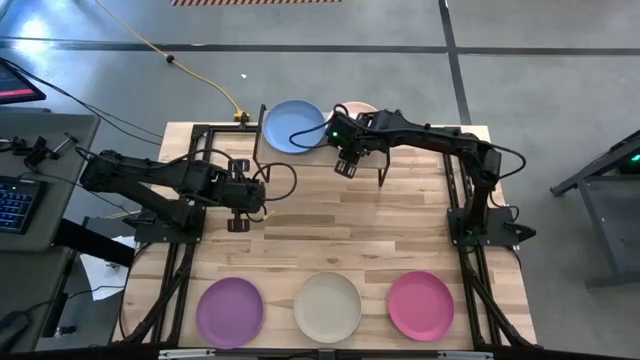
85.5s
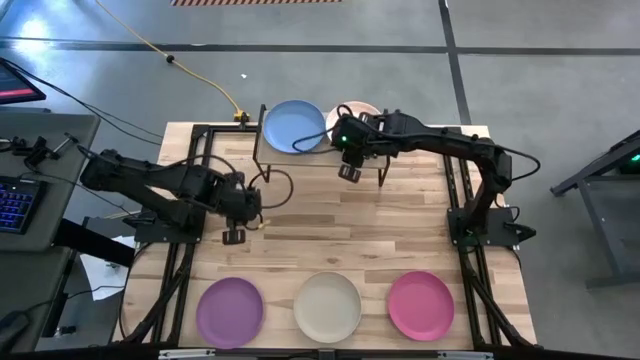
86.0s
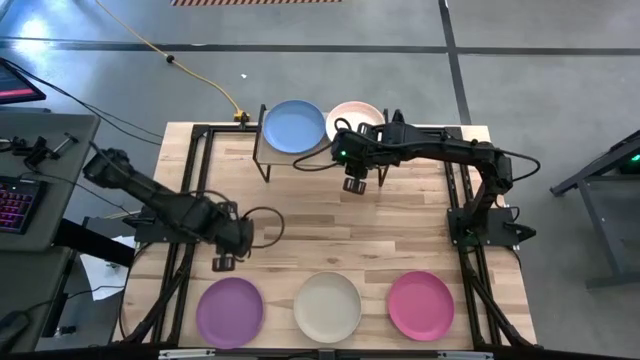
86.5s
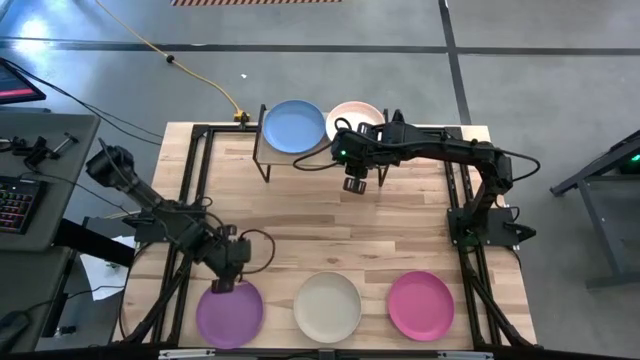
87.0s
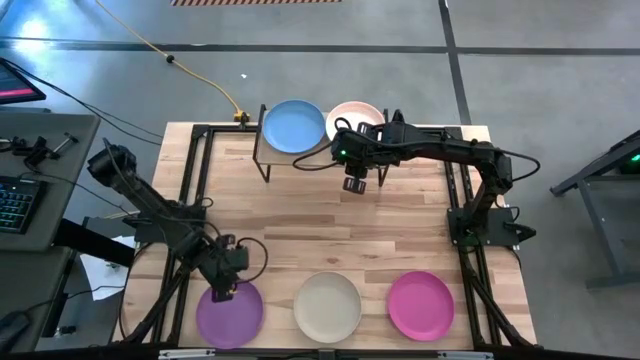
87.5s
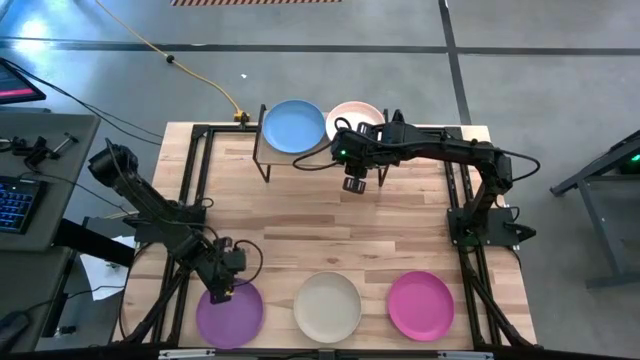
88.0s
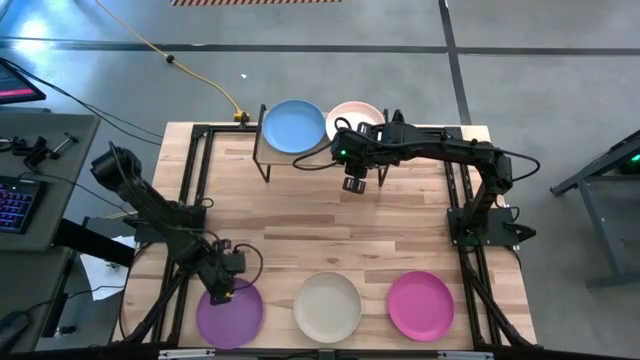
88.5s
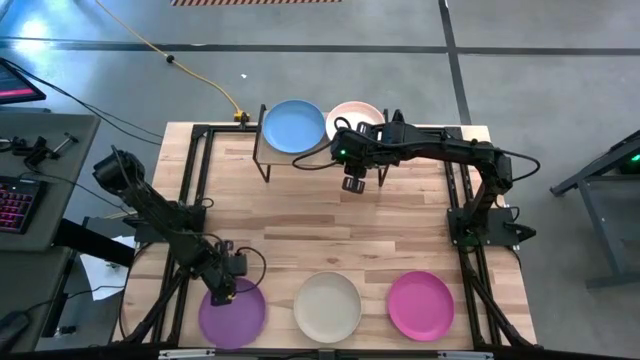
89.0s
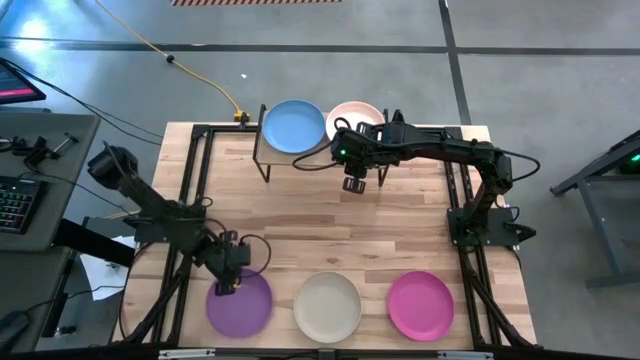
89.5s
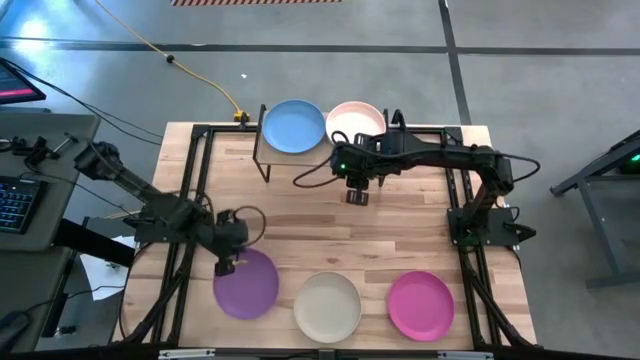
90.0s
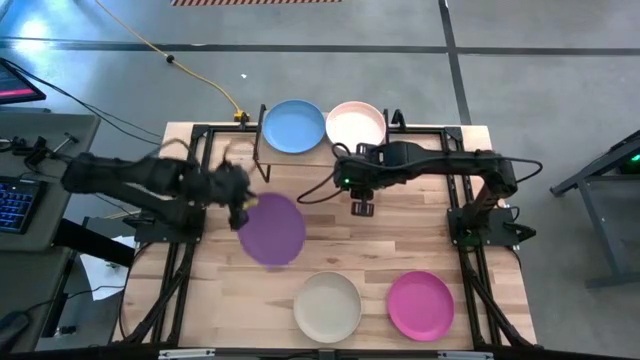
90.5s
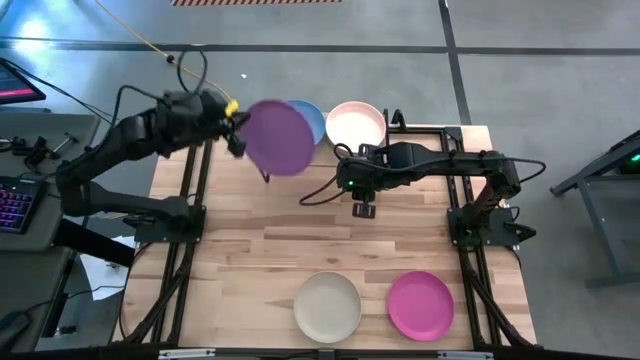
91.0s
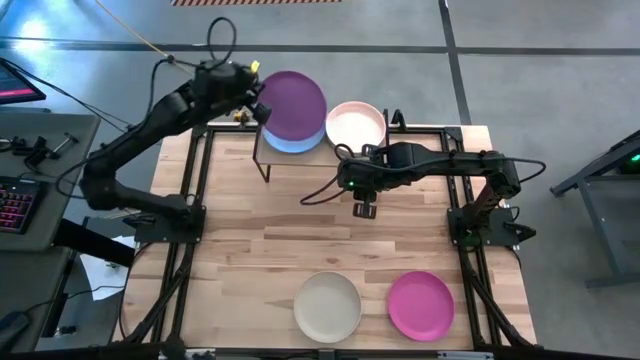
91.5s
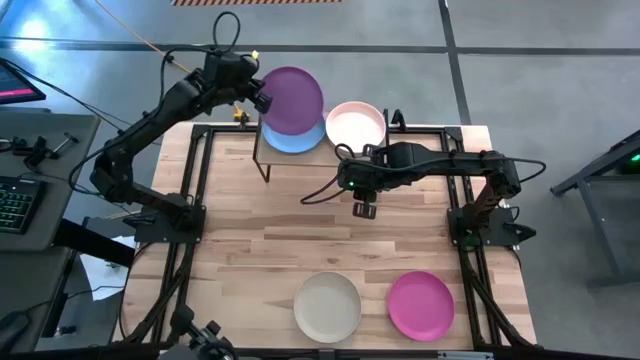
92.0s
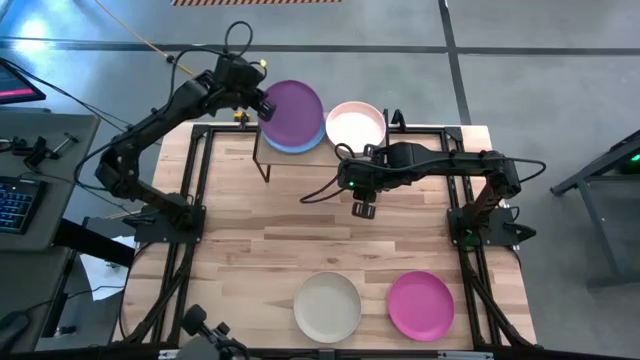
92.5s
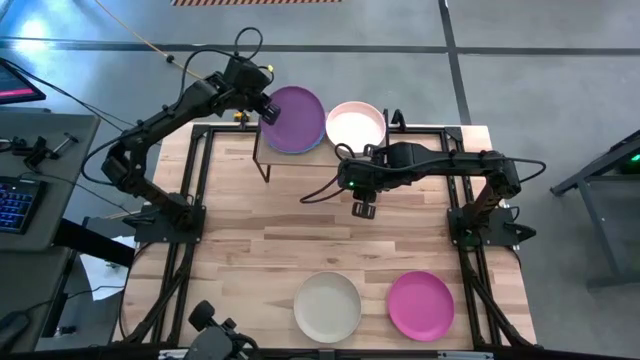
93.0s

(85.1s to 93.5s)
Task: Place and stack plates onto a shelf
Stack the purple plate into the blue plate on the shelf

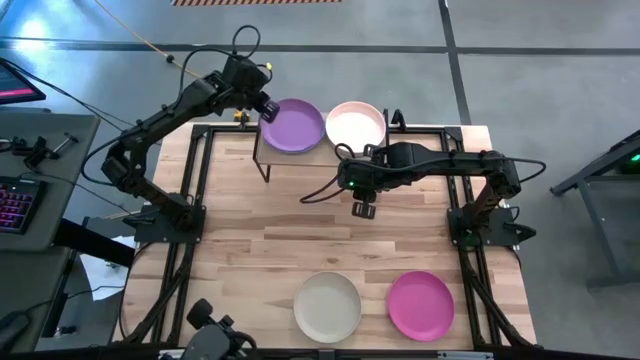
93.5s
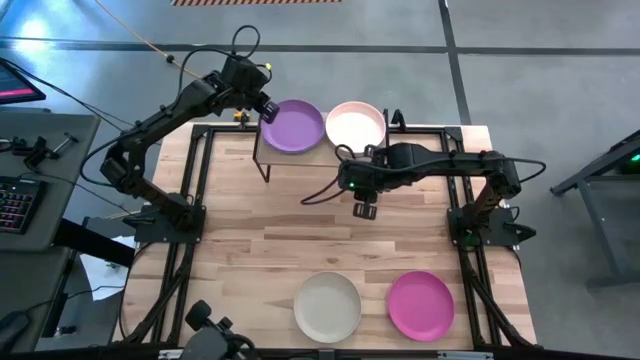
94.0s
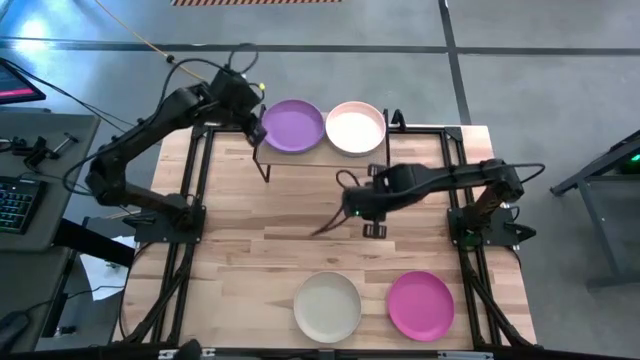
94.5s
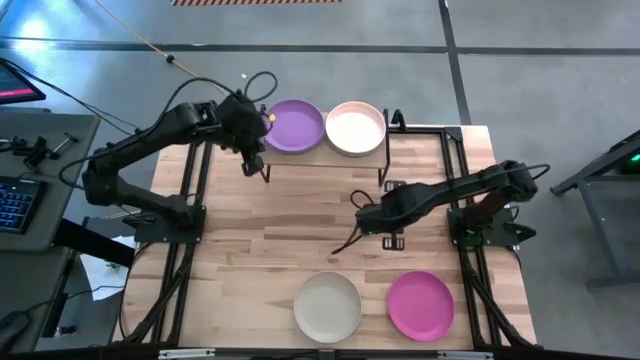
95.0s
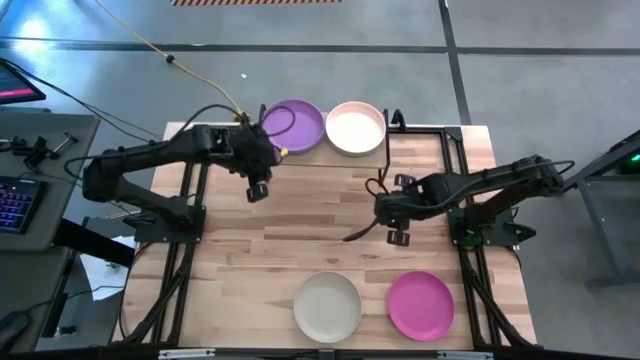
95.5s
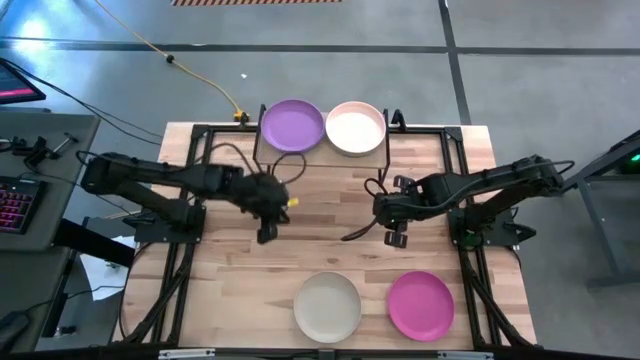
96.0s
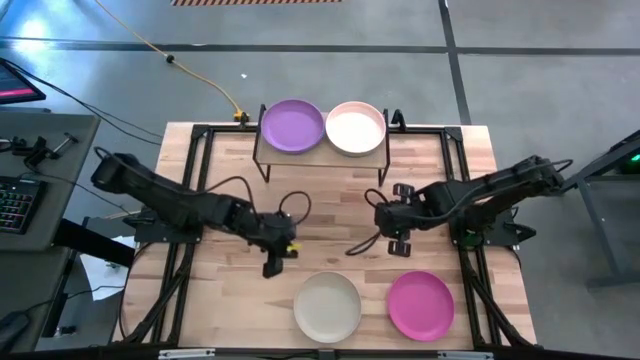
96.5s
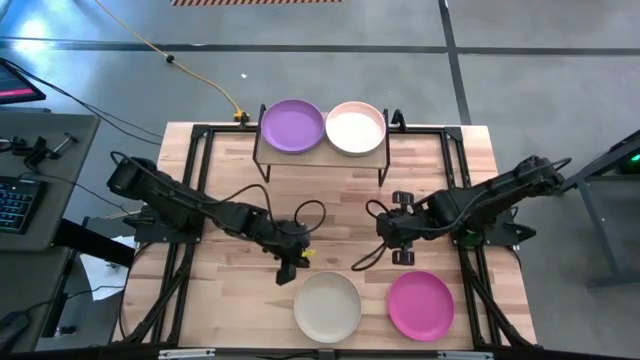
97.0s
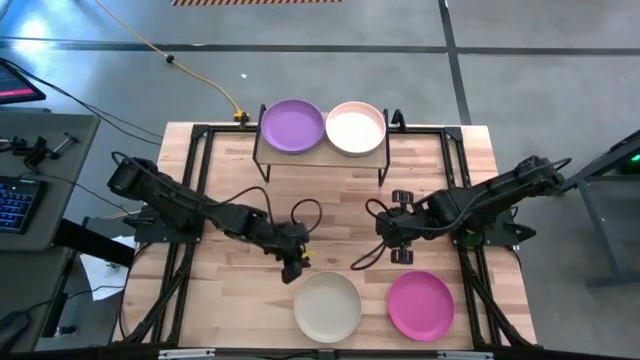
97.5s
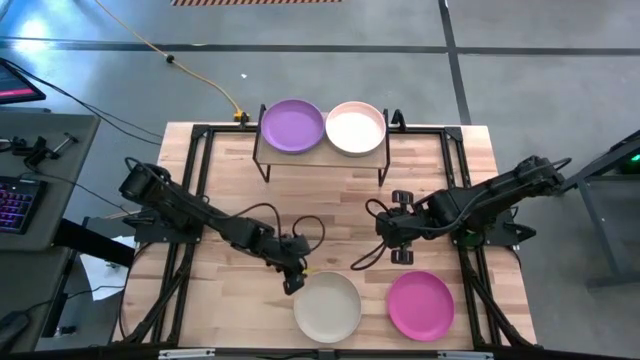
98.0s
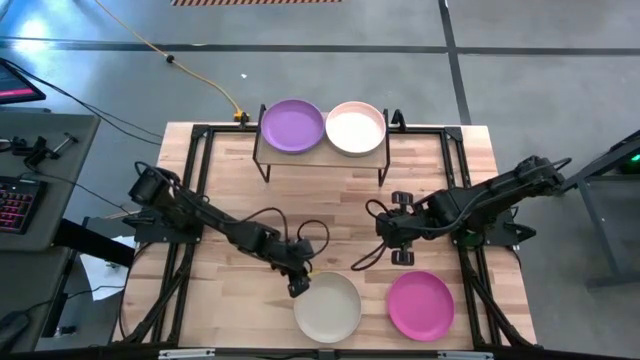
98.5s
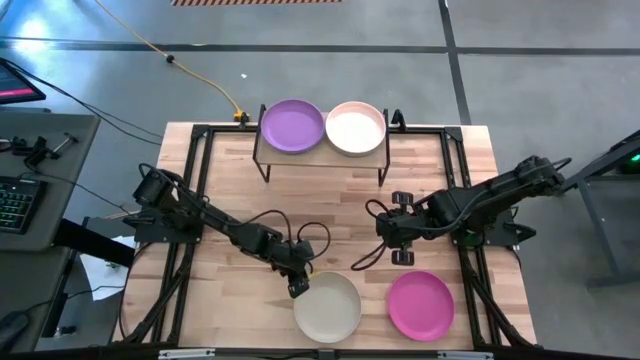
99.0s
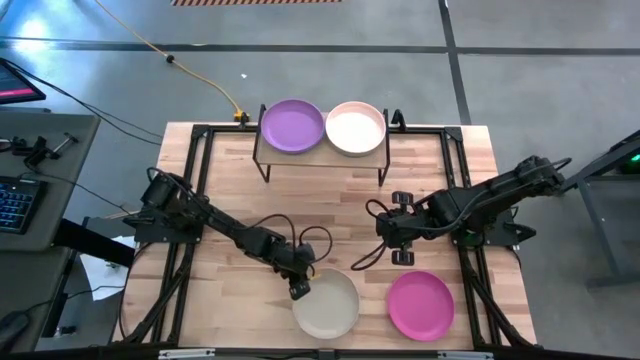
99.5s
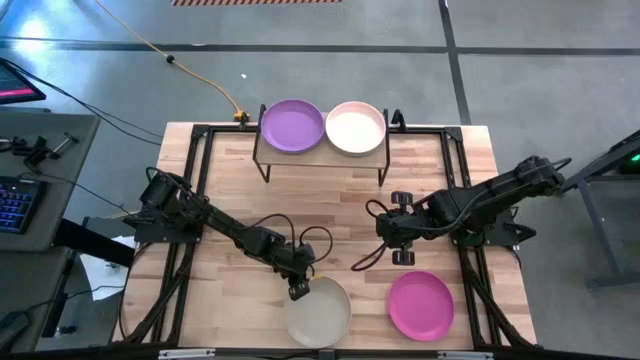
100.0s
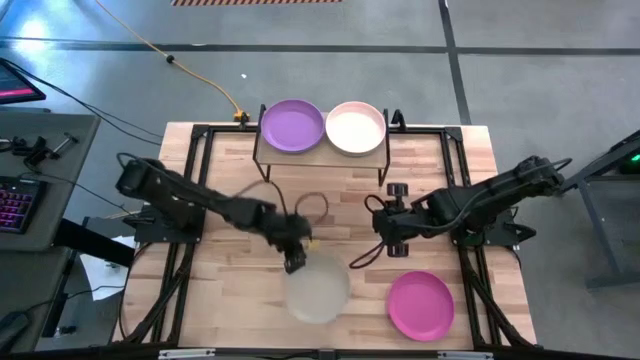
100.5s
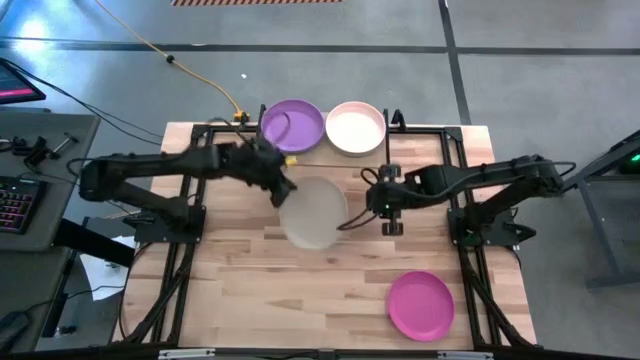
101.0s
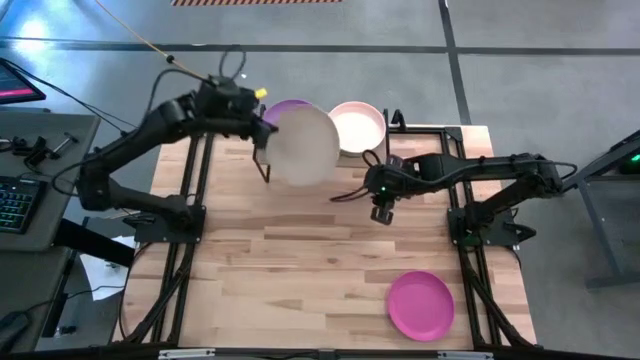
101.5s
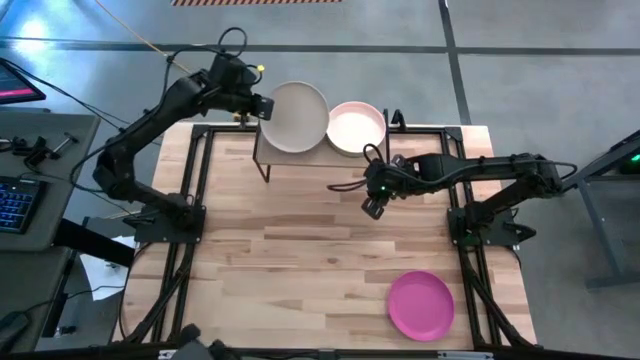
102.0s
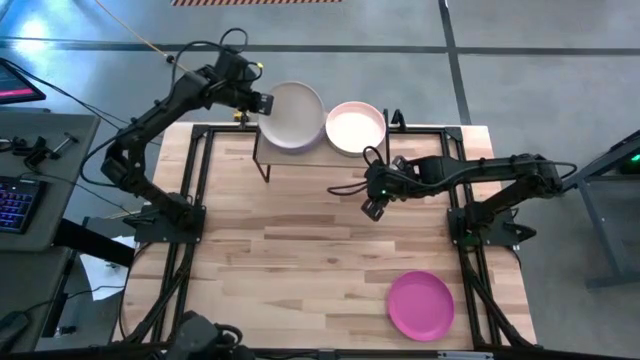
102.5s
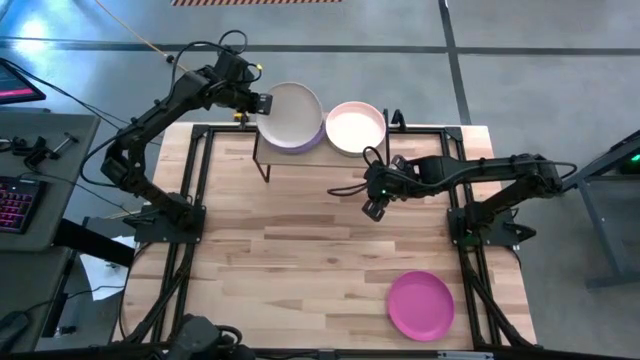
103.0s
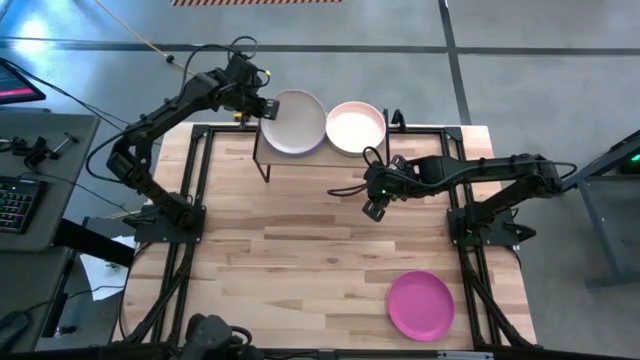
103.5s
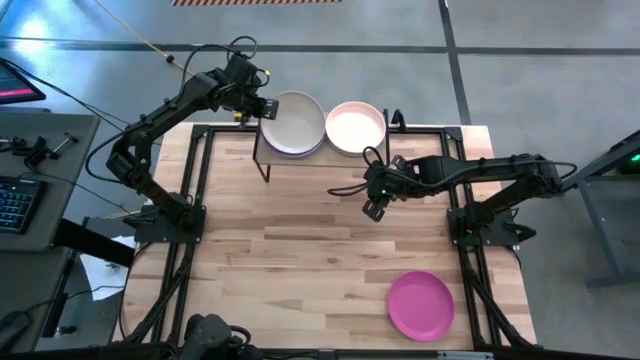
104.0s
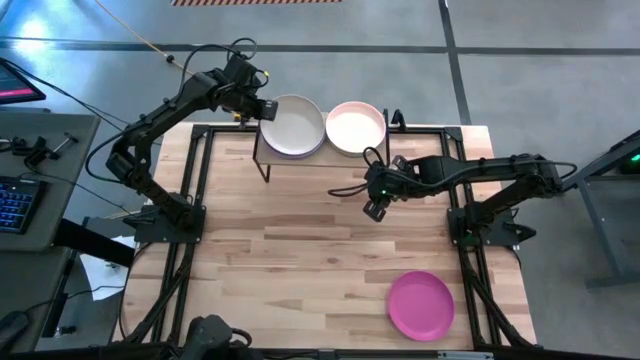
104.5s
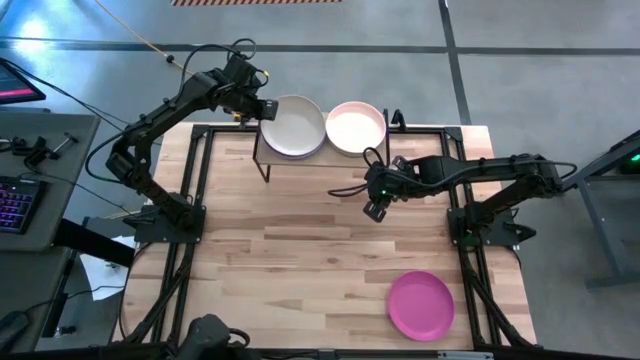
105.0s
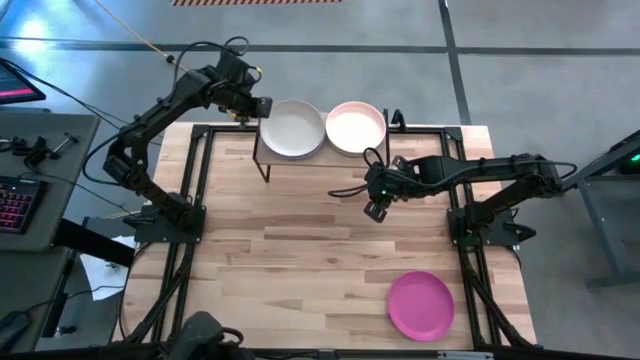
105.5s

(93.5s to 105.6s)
Stack the light gray plate into the purple plate on the shelf

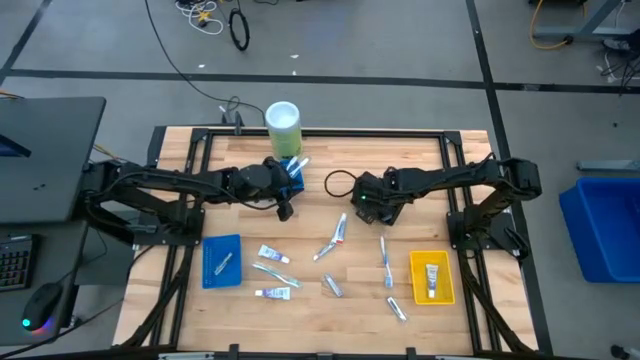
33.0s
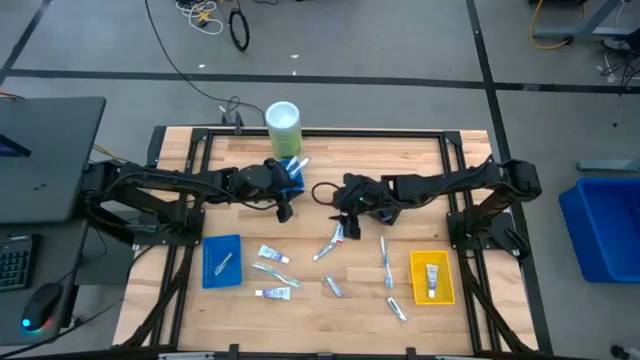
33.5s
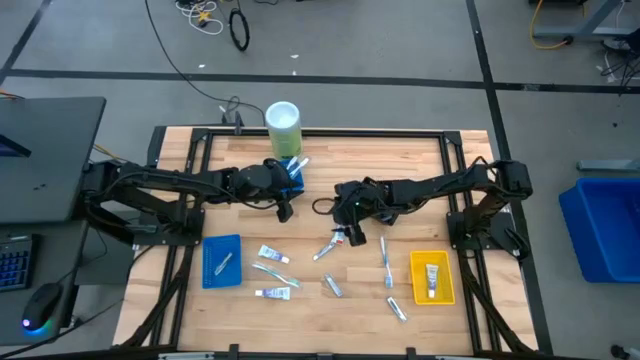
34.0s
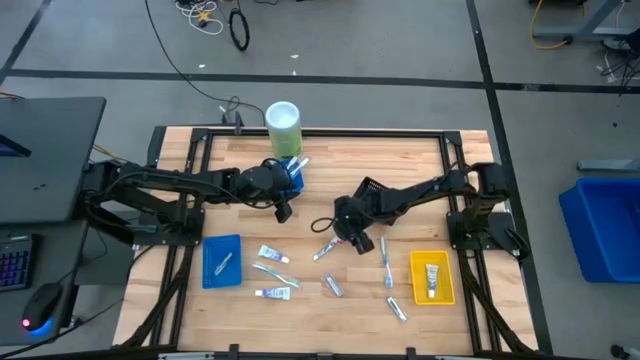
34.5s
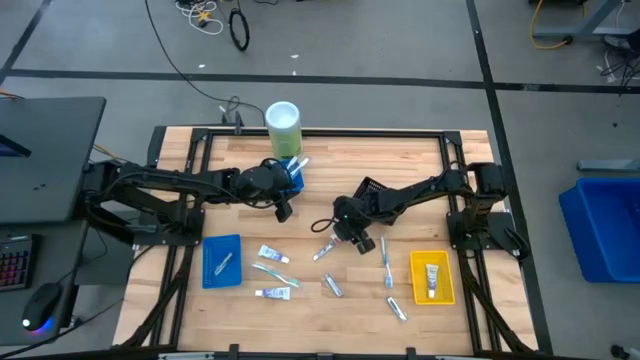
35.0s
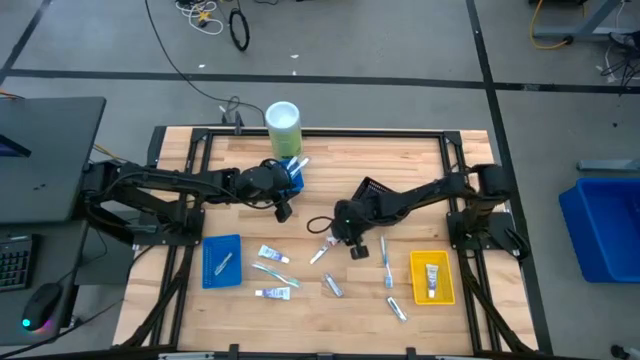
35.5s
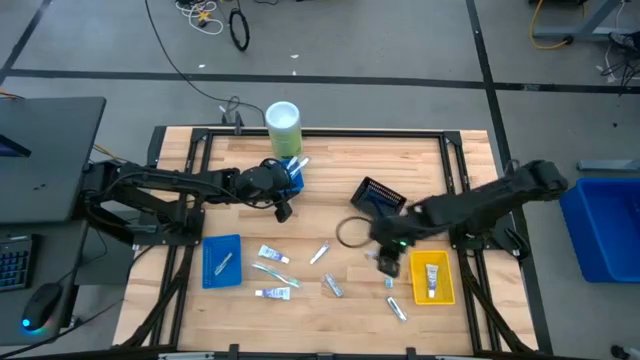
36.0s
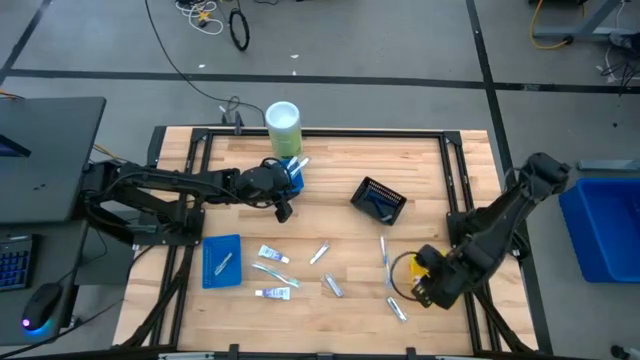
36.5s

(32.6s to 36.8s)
Task: Pick & Place Travel size toiletries
Put the white toothpaste into the yellow bin
